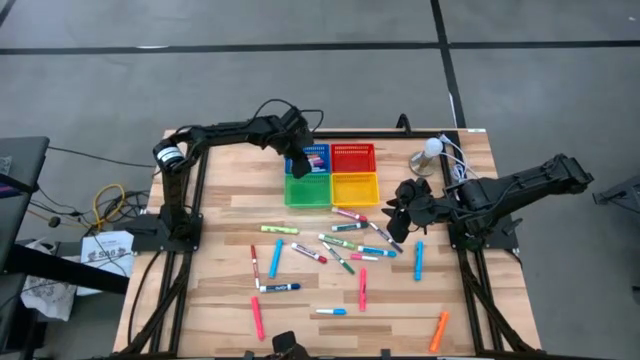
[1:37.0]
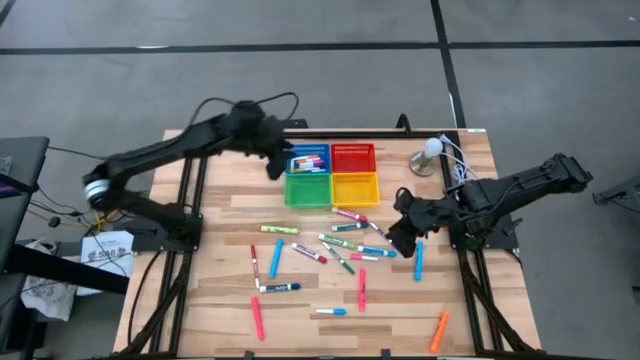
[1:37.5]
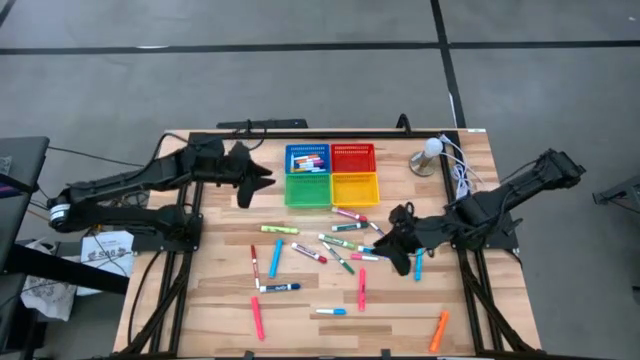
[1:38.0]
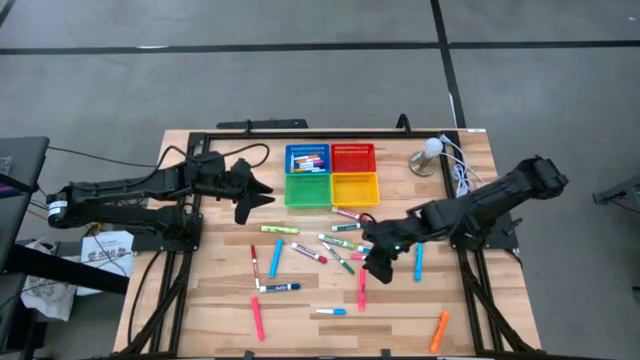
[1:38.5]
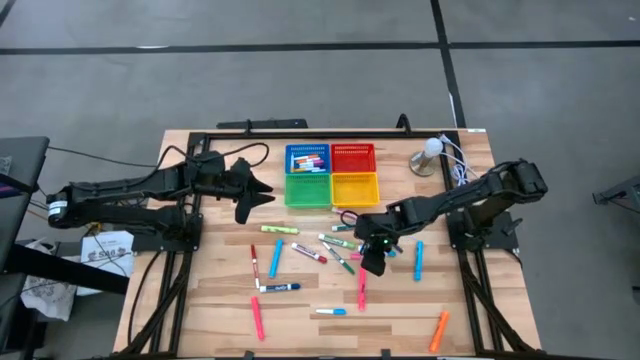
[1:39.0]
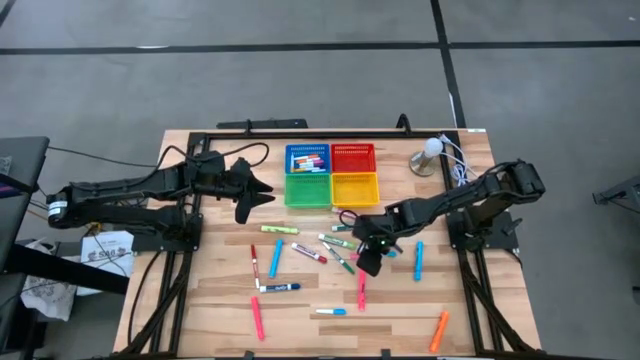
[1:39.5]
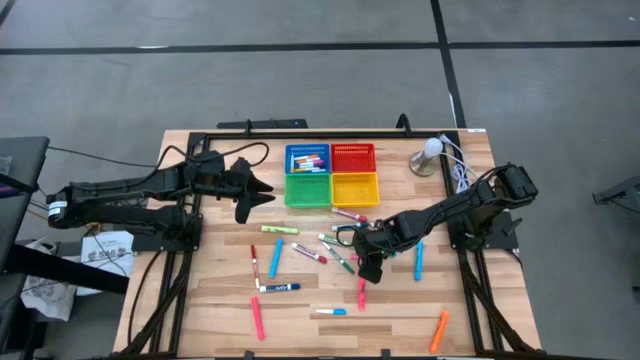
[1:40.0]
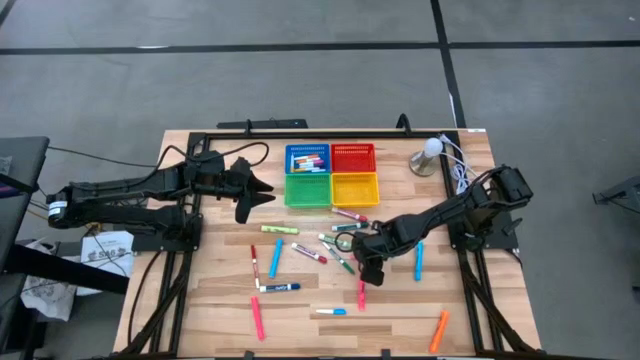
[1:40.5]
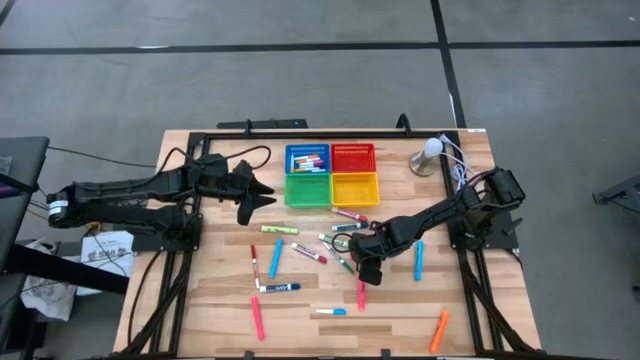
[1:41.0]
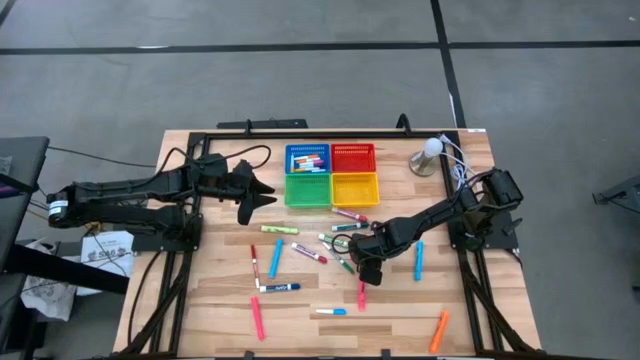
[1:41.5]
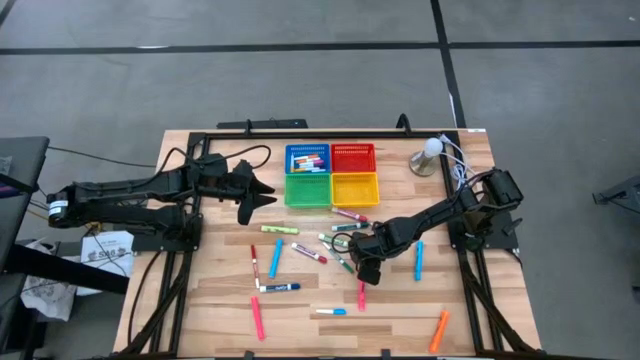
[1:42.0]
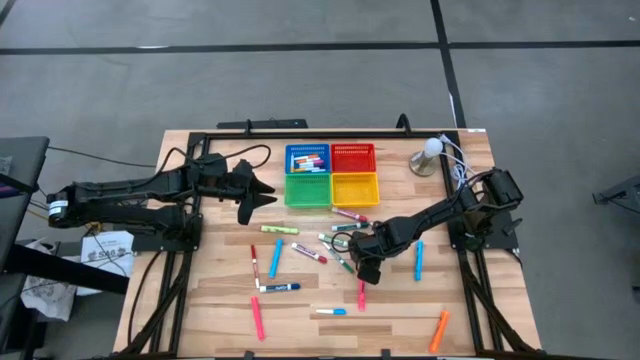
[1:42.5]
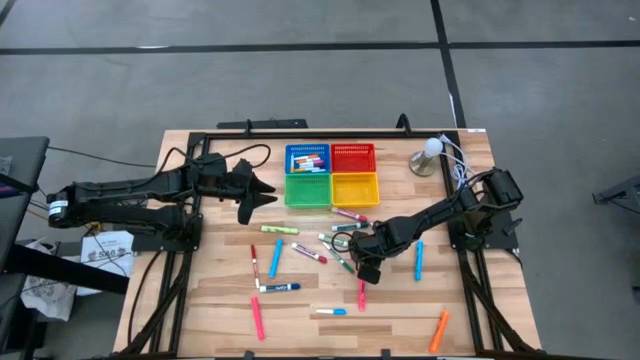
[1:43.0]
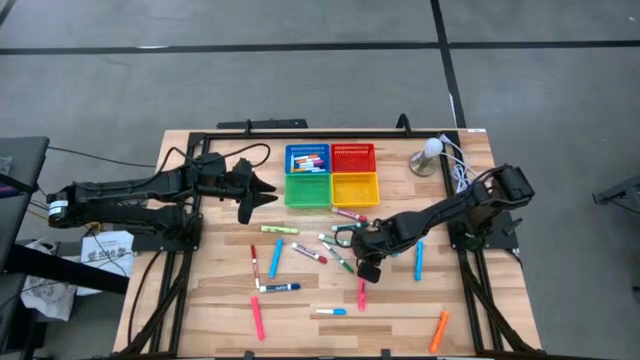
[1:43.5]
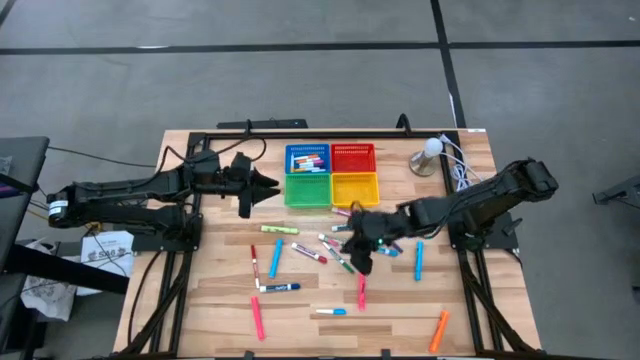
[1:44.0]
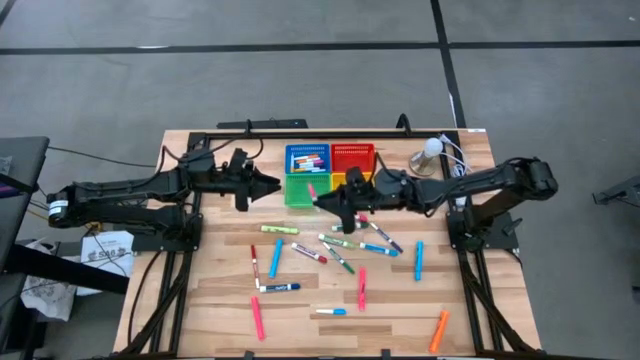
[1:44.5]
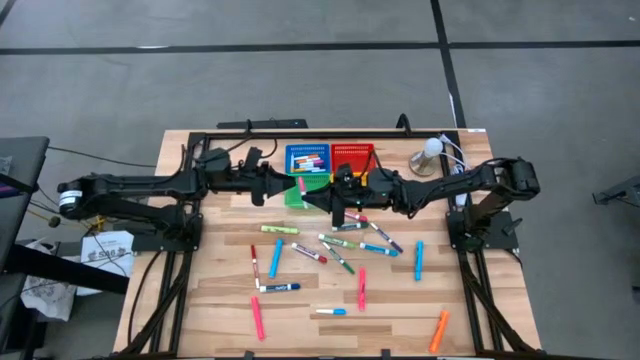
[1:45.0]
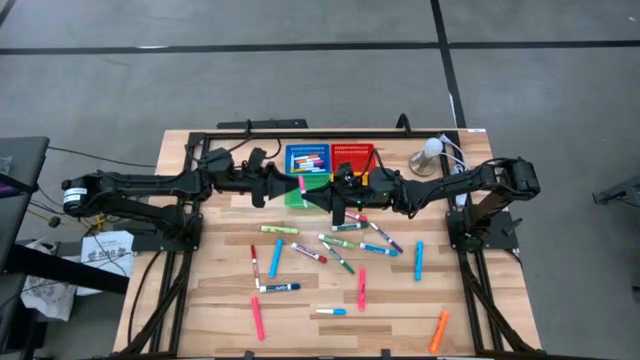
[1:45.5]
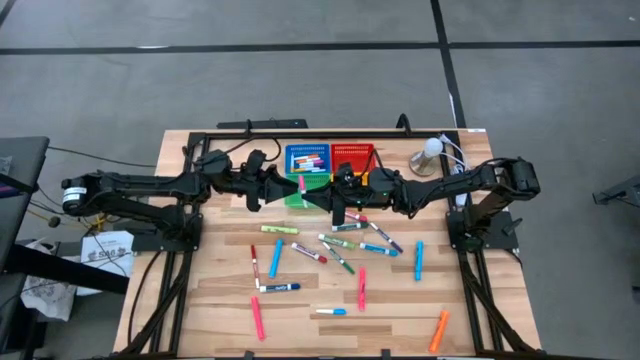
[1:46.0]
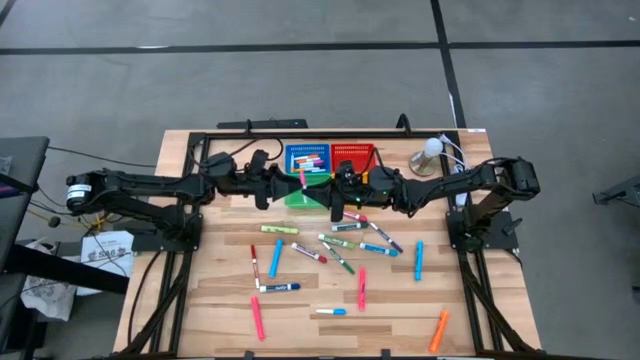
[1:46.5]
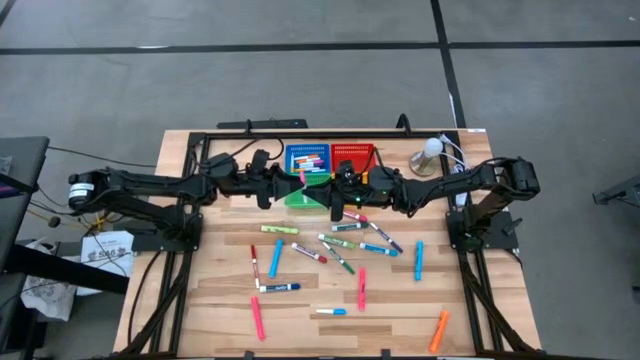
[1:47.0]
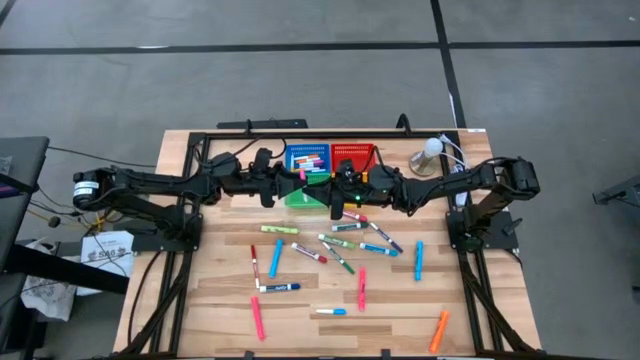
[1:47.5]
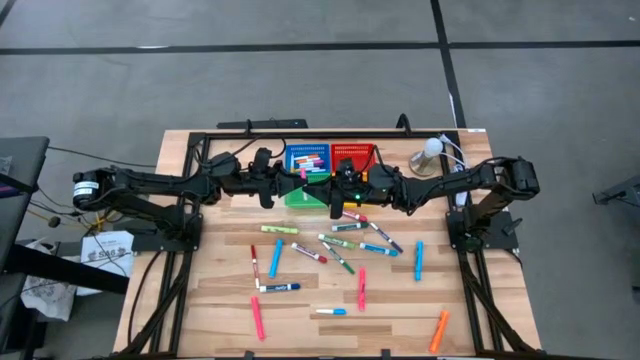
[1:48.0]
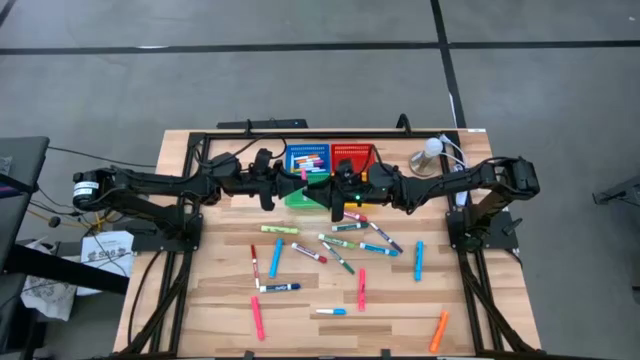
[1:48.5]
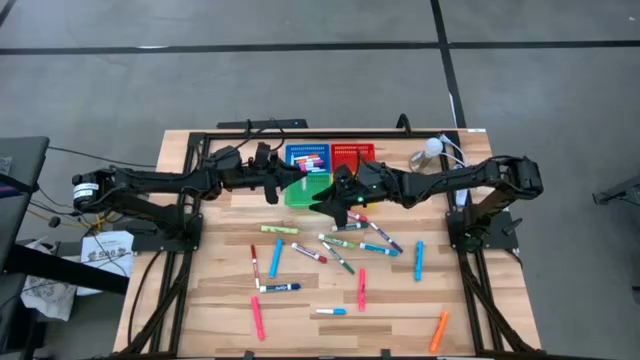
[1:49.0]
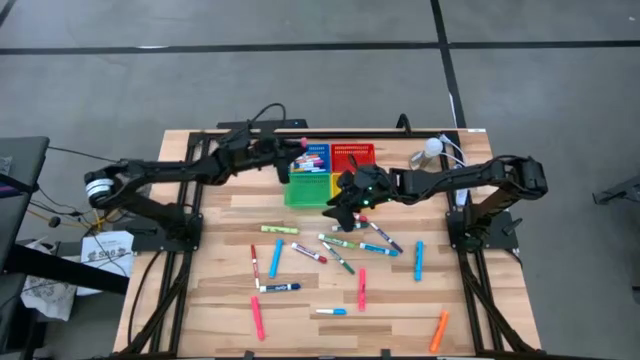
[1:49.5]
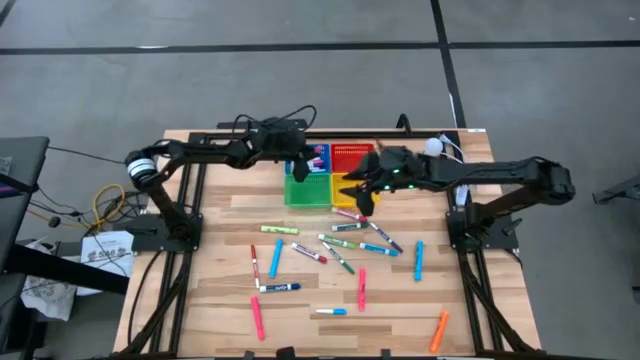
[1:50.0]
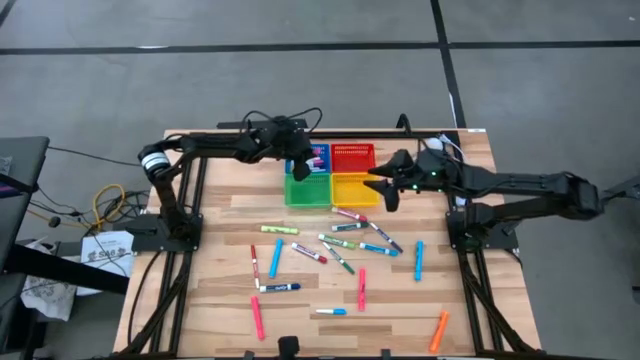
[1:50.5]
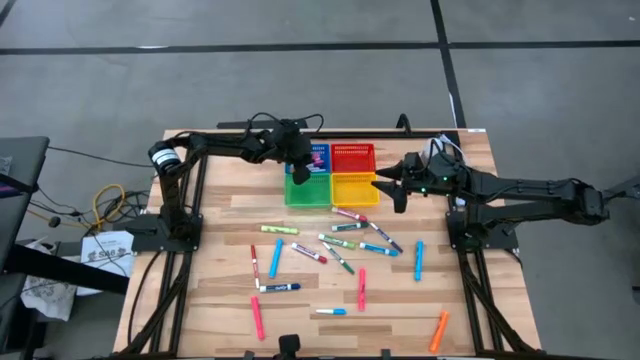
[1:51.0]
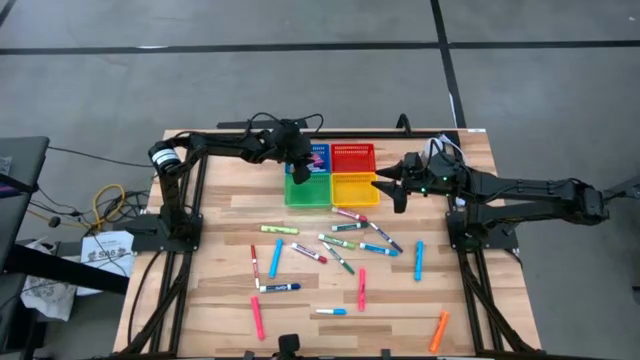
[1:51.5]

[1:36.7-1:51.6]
Task: Pick & Place Markers
Put the small pink marker into the blue bin

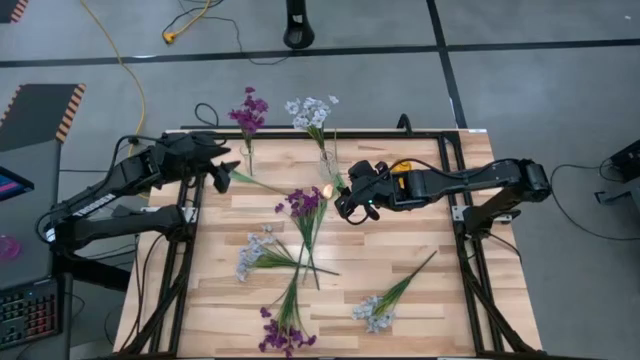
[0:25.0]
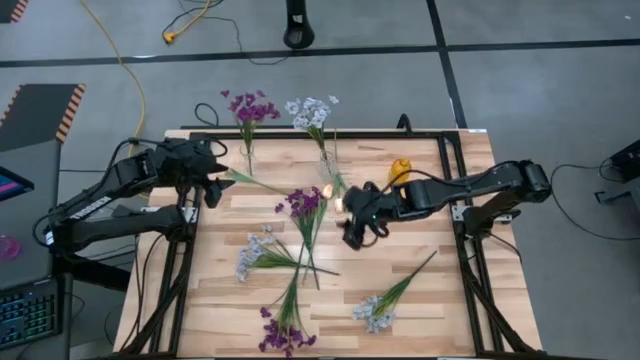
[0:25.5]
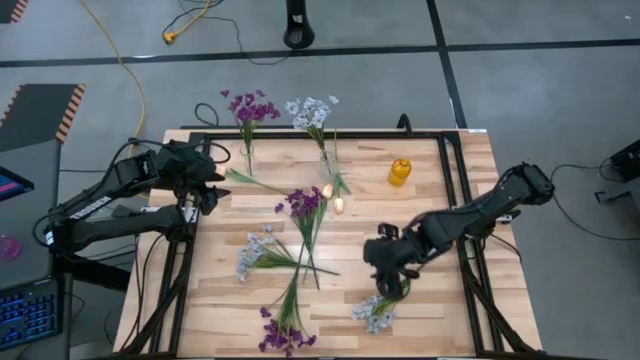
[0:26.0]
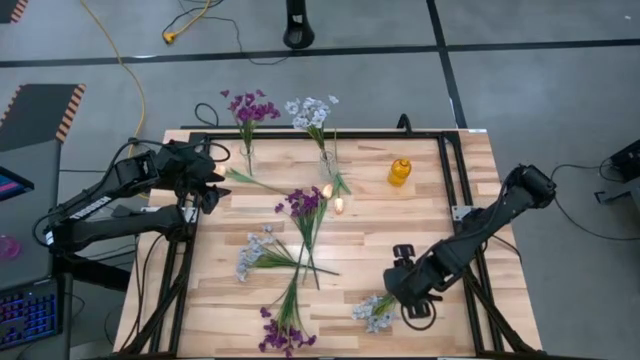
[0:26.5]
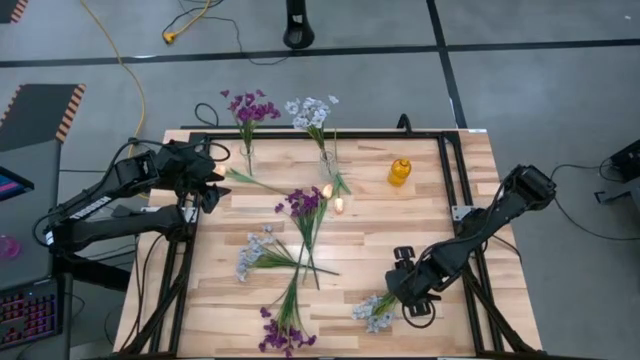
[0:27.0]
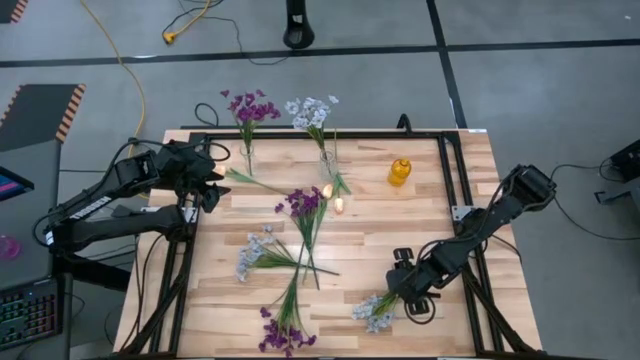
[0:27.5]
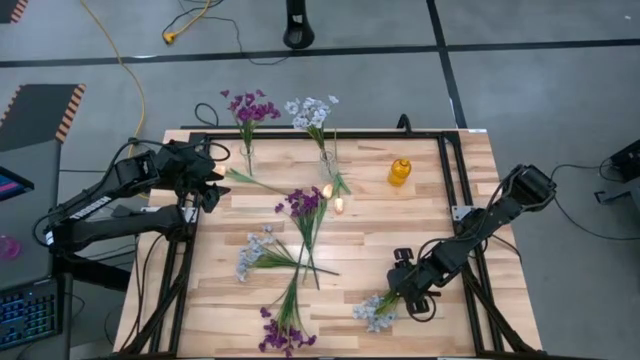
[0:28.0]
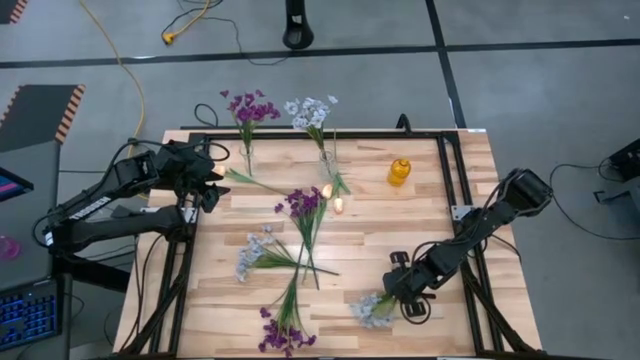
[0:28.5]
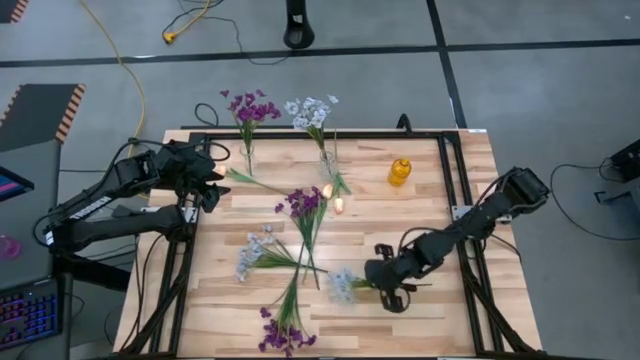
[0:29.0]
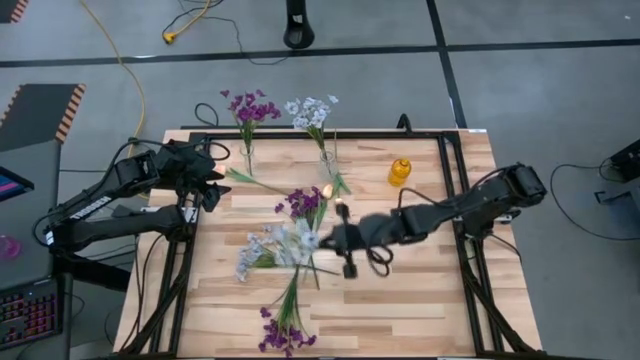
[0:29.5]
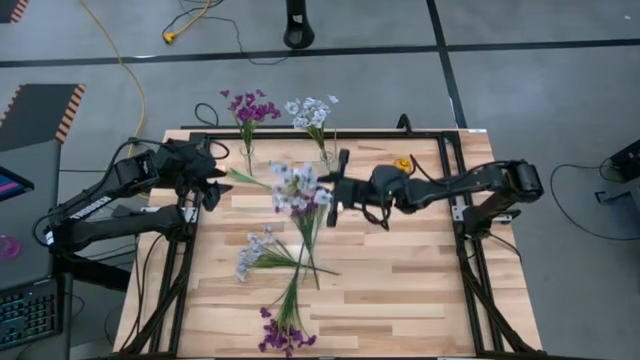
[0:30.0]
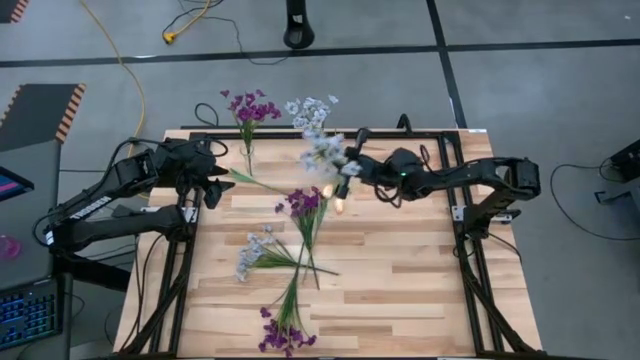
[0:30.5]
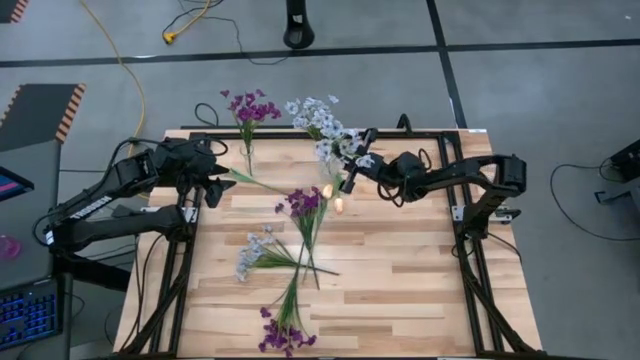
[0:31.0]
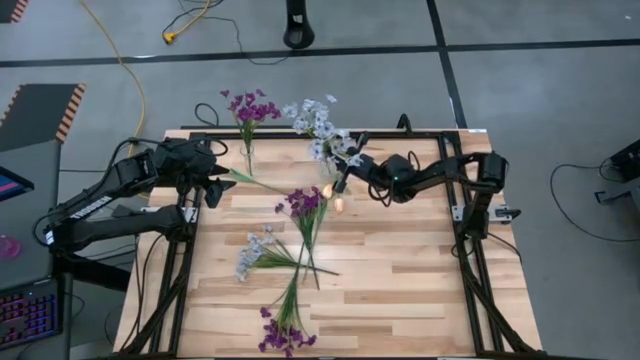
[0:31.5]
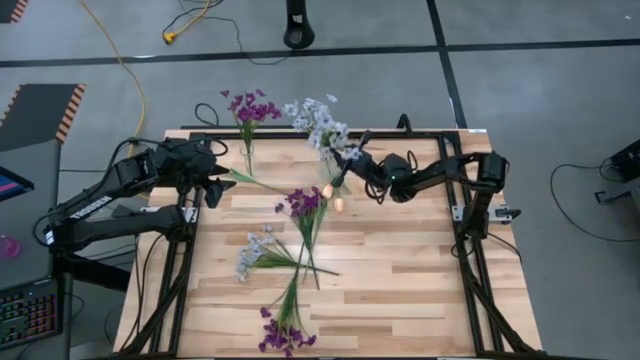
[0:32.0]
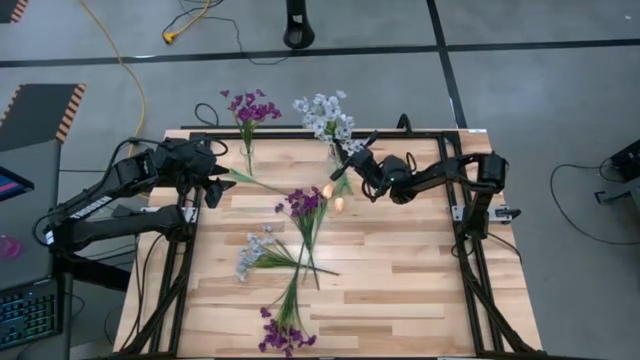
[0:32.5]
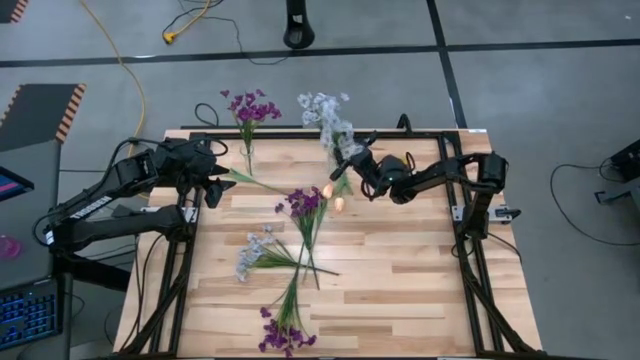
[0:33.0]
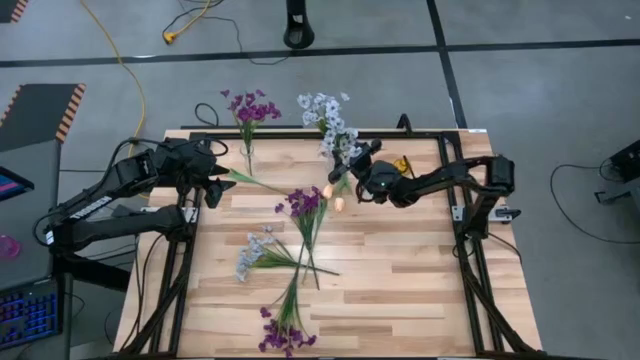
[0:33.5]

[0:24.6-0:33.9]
Task: Sort flowers into vase by color
Put the right white flowers into the right transparent vase
